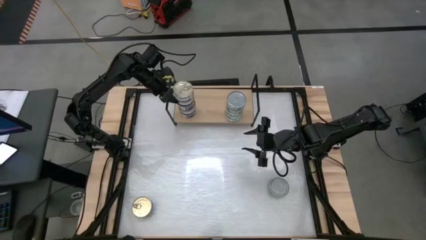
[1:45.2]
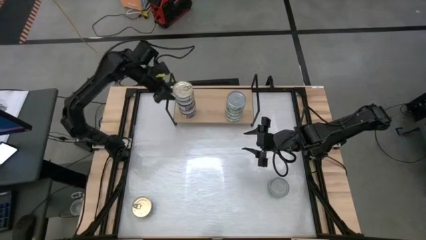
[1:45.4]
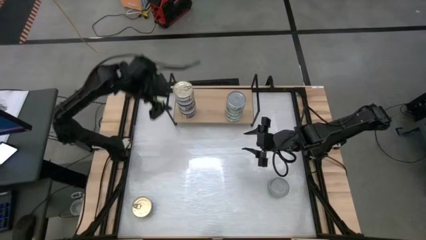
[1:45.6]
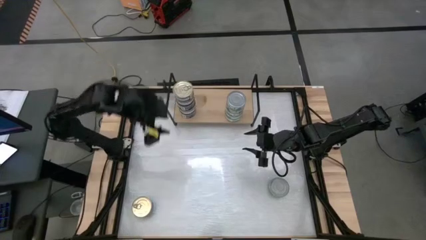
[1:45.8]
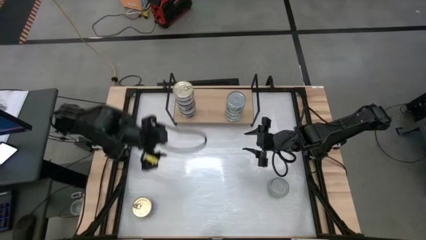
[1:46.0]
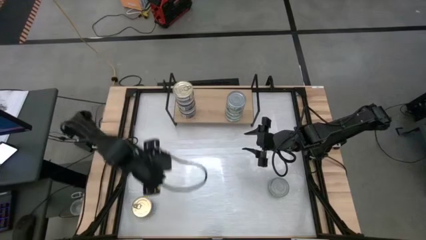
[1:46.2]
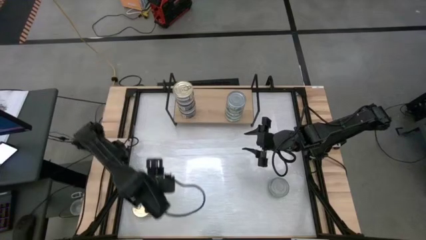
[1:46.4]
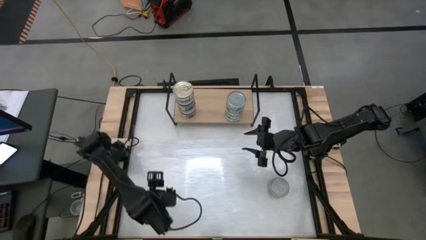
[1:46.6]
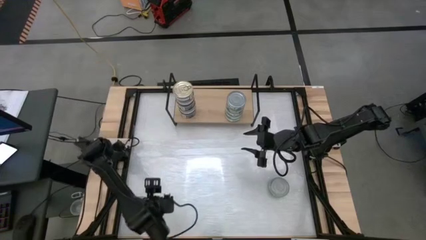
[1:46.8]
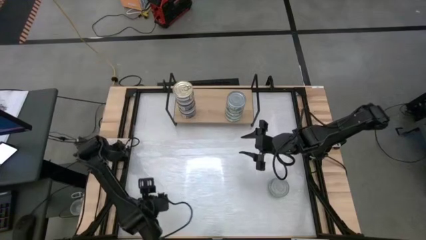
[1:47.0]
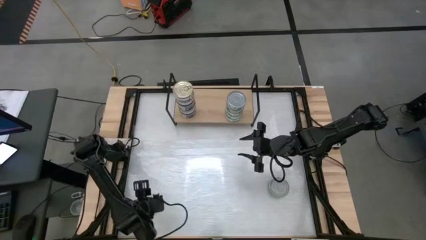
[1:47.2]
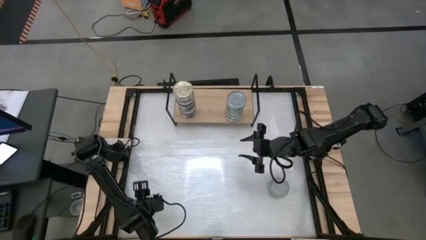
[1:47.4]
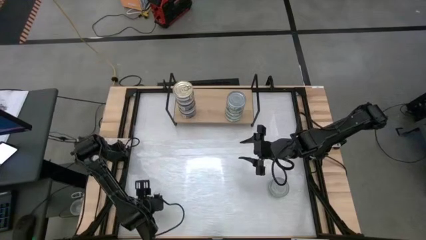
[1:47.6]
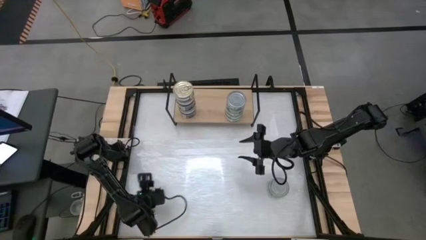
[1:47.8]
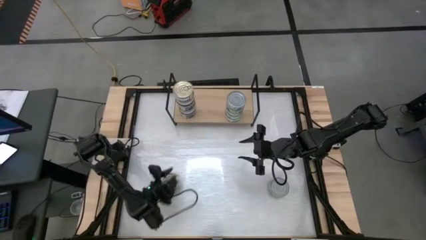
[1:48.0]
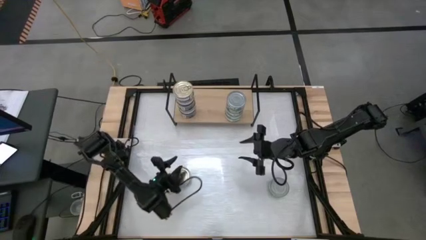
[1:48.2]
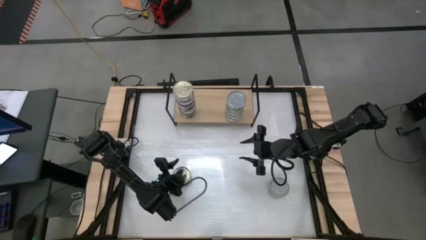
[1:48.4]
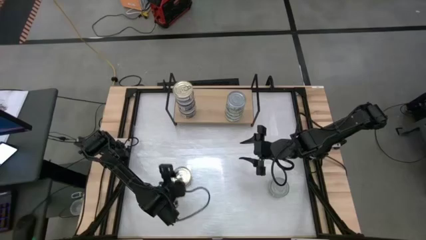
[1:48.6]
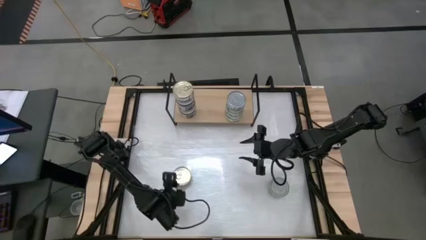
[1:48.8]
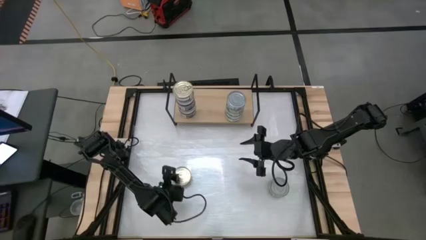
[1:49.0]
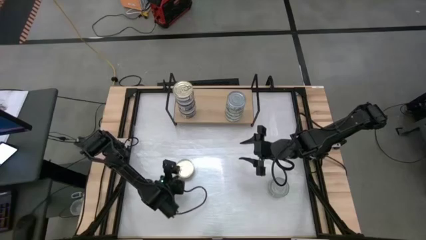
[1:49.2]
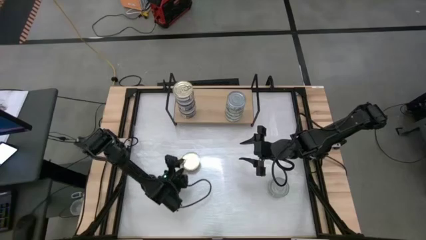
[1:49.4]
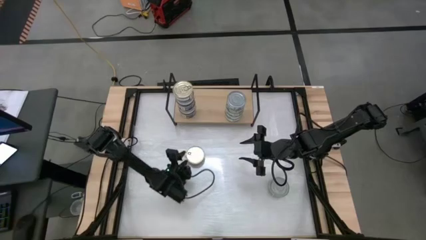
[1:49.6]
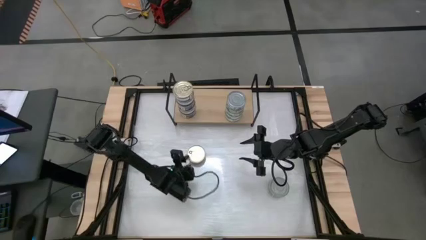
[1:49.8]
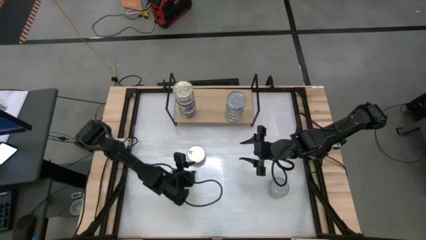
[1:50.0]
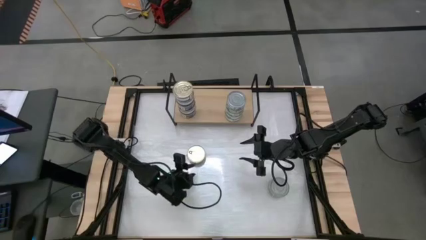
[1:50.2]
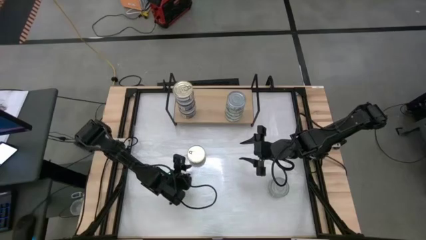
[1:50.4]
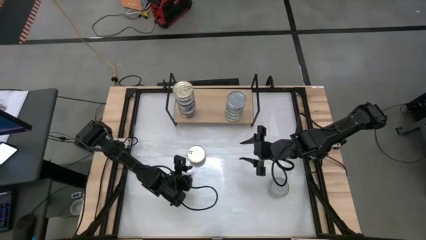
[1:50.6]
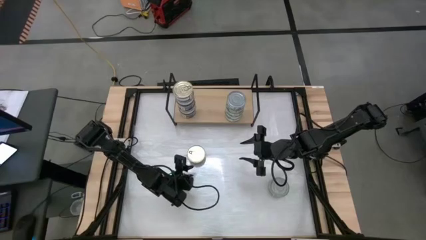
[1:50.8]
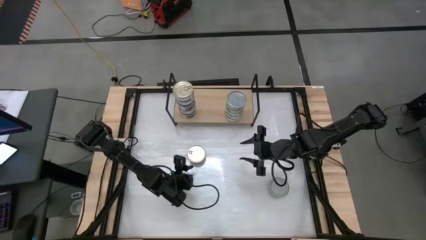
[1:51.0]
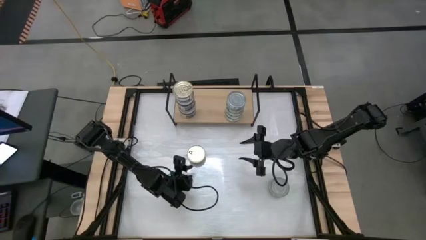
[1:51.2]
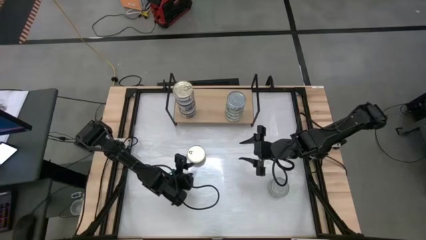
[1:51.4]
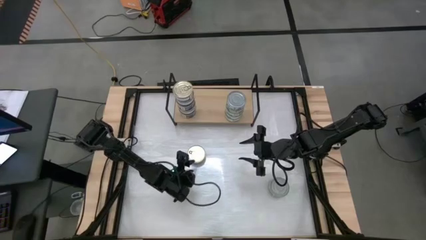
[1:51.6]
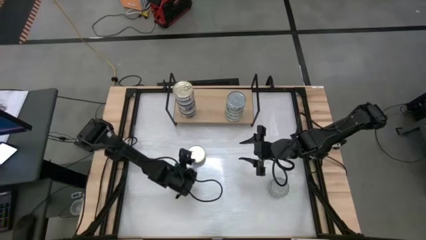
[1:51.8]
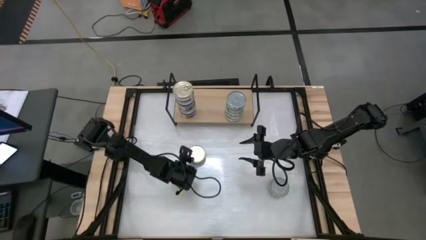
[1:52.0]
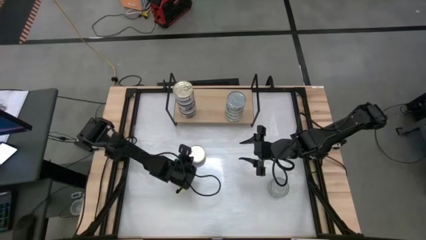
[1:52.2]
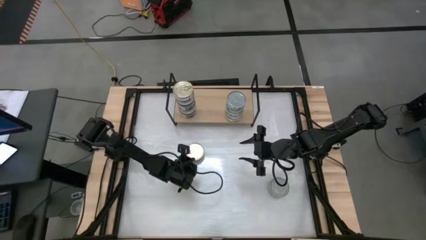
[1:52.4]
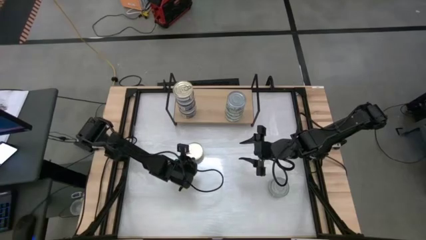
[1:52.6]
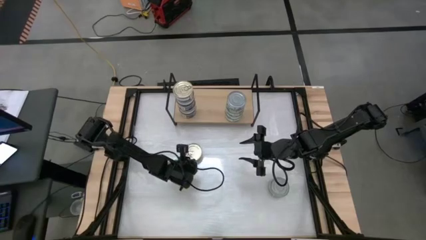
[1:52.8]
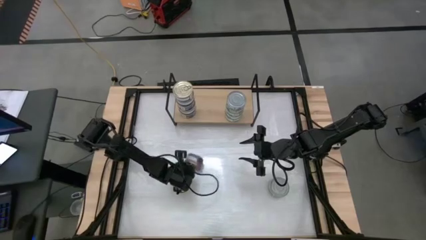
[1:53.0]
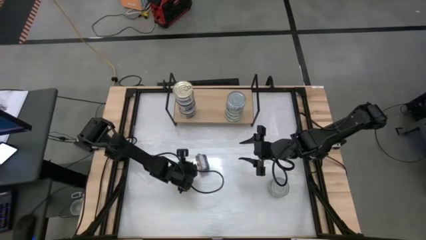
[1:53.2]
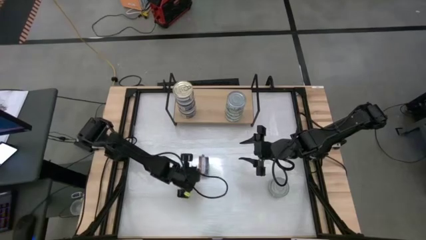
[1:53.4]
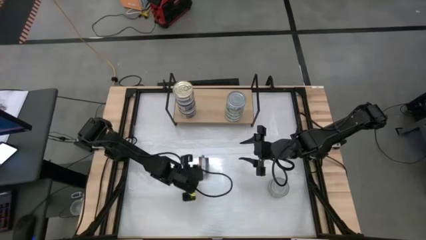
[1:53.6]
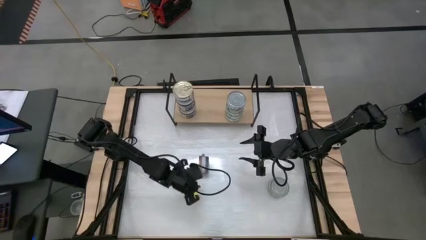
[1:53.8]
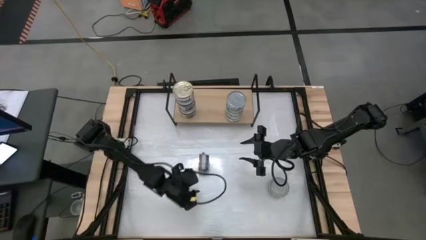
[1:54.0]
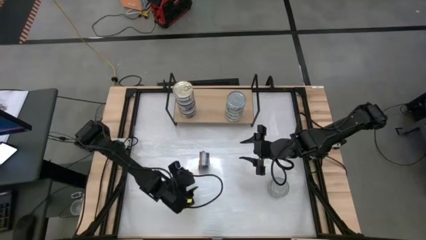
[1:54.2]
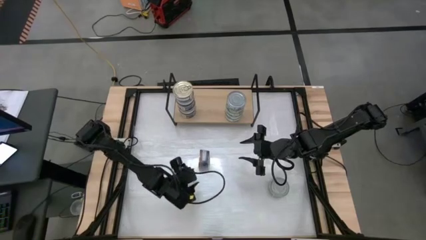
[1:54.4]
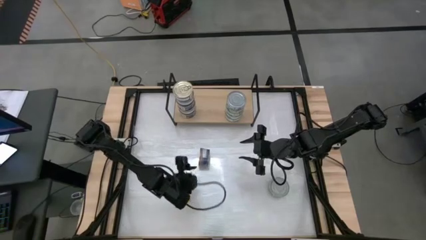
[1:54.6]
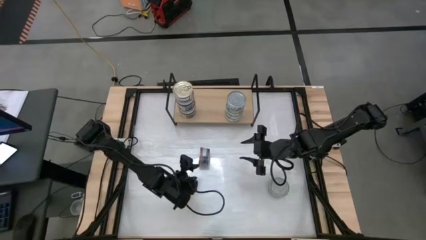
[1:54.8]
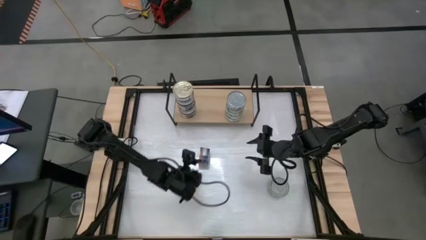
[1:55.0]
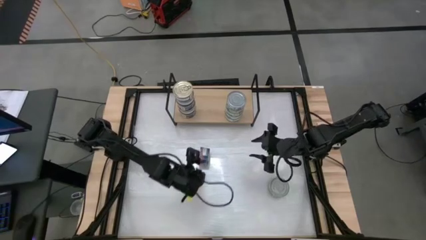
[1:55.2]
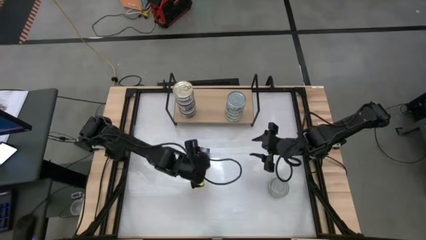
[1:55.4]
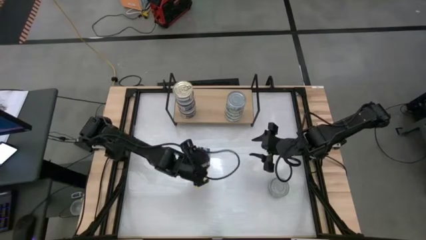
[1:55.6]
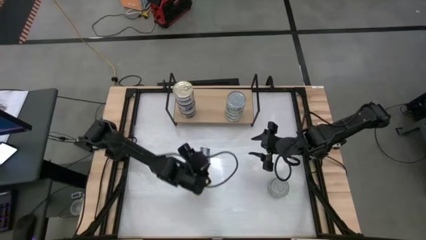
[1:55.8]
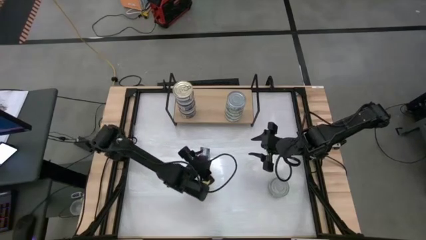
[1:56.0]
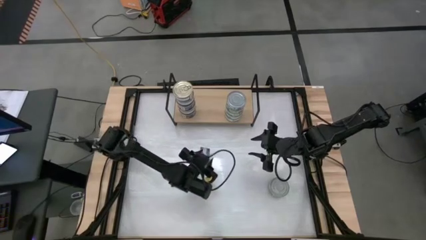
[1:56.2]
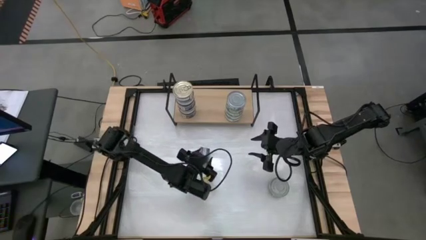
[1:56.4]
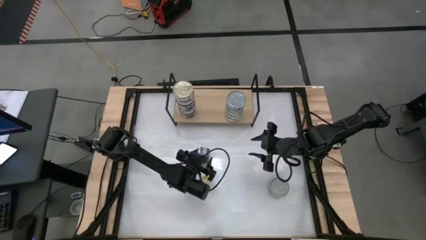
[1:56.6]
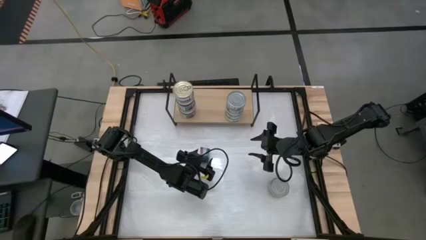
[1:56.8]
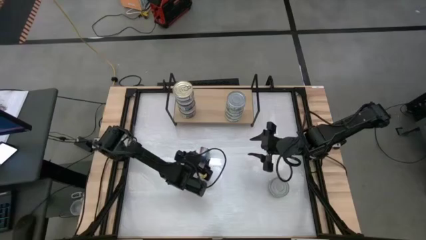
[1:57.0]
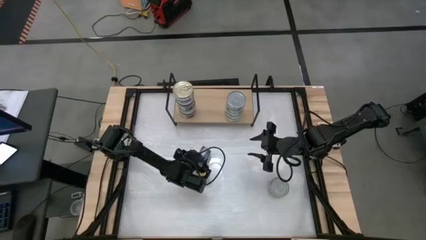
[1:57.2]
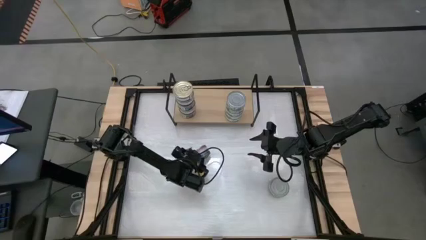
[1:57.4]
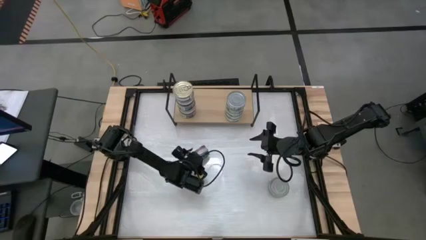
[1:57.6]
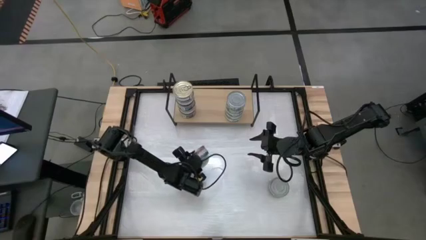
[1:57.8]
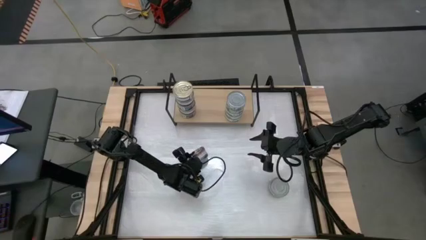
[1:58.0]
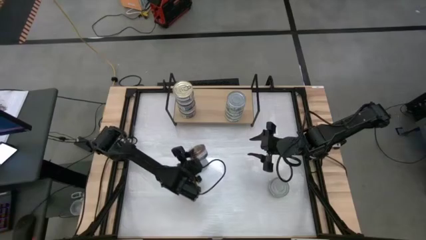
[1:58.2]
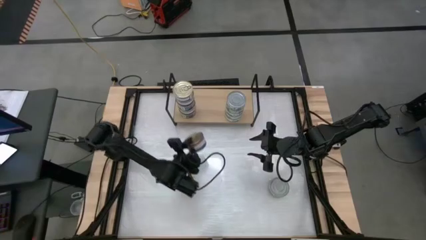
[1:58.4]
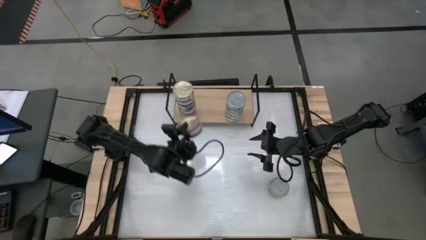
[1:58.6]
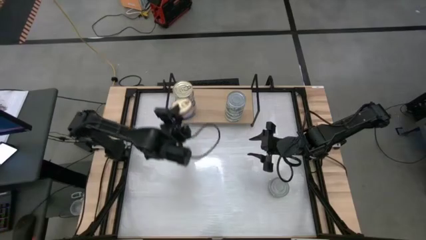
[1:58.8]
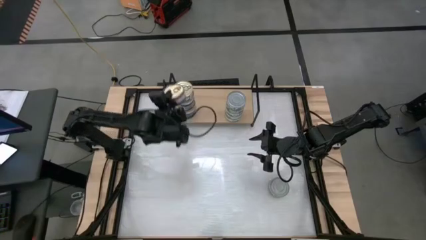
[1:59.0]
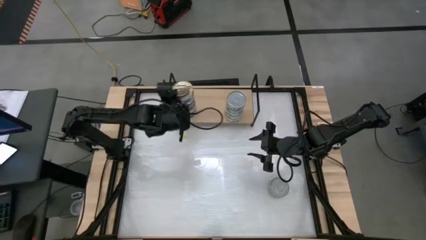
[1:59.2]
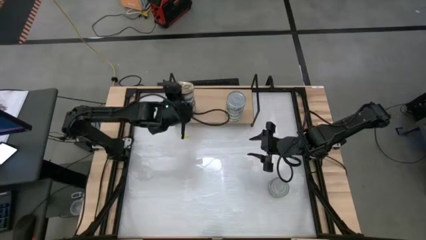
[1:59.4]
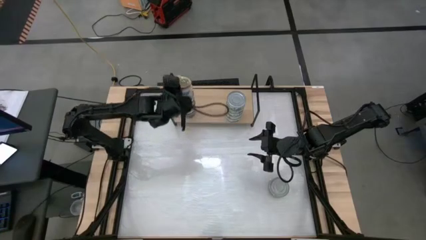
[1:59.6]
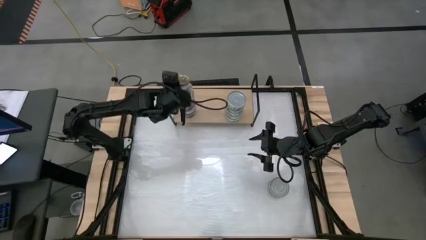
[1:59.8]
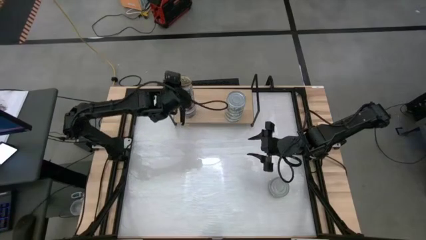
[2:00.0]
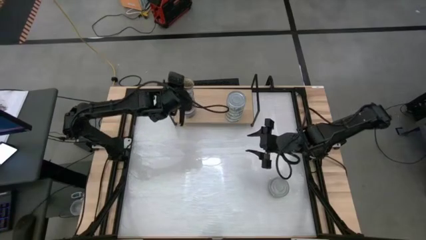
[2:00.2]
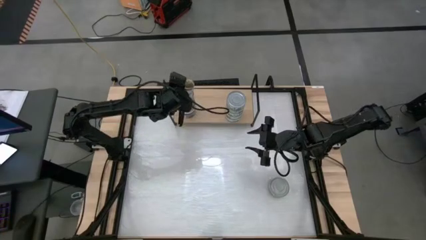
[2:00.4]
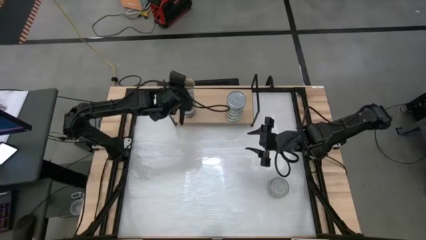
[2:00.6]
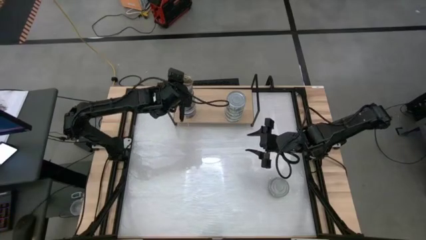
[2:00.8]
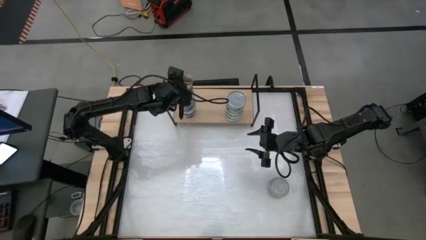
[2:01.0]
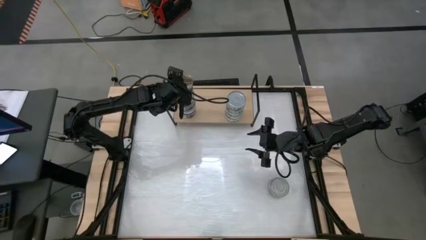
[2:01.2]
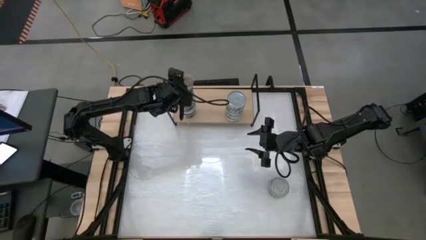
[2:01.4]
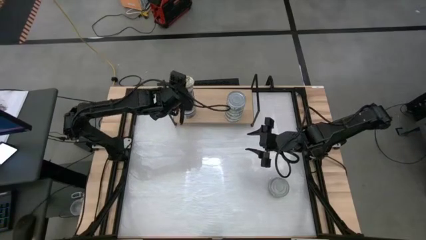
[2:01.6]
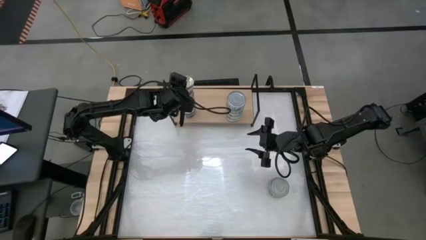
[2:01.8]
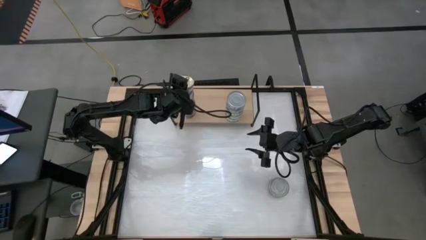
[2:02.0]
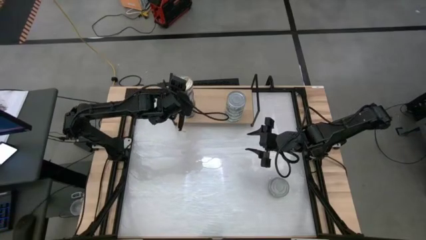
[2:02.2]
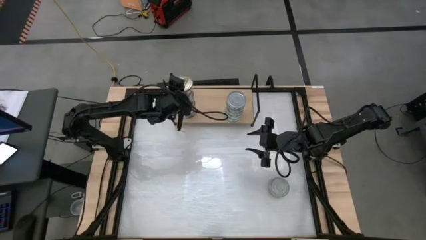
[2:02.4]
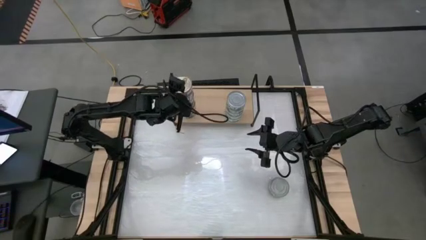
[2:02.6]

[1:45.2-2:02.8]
Task: Stack canned seafood by type on shelf
Stack the blue pink tuna can on top of the blue pink tuna can on the shelf
